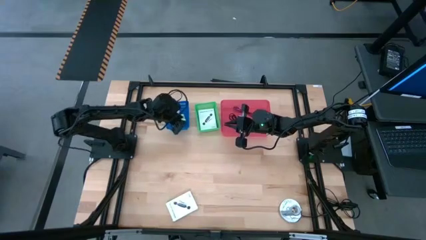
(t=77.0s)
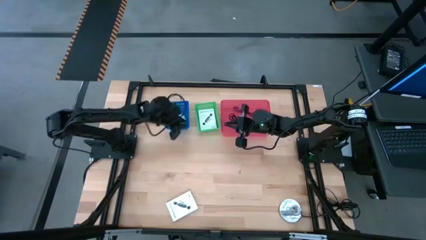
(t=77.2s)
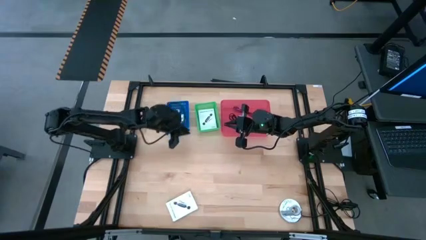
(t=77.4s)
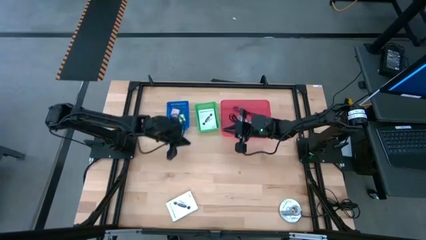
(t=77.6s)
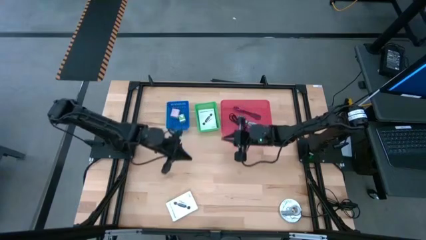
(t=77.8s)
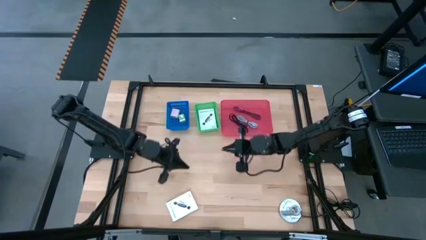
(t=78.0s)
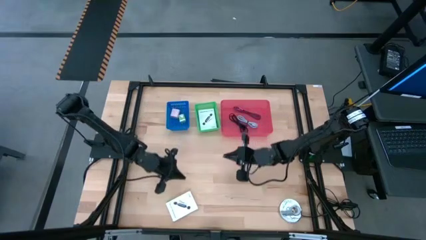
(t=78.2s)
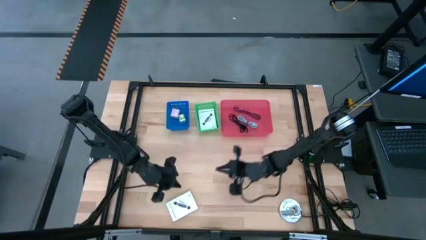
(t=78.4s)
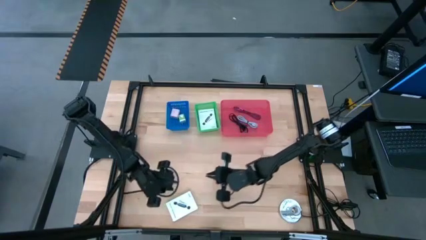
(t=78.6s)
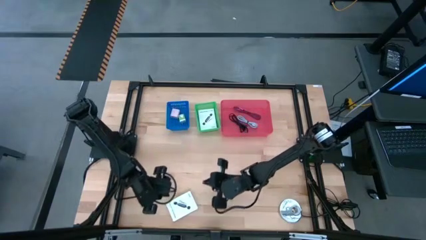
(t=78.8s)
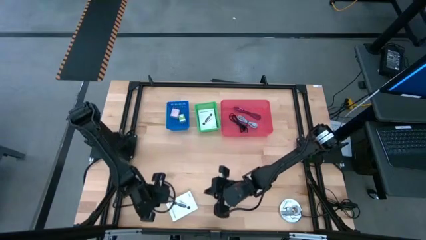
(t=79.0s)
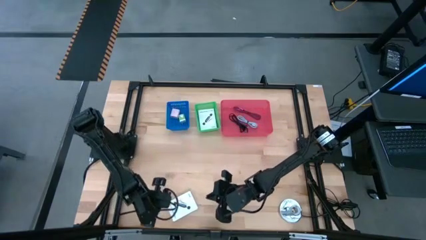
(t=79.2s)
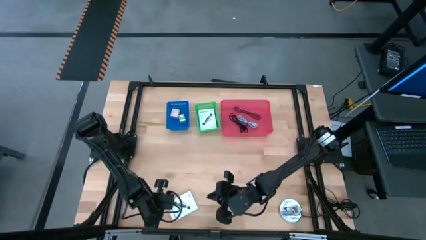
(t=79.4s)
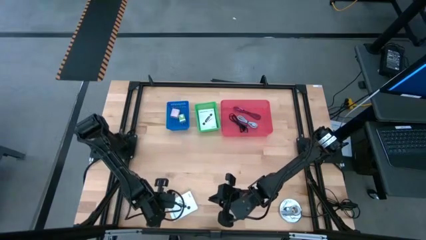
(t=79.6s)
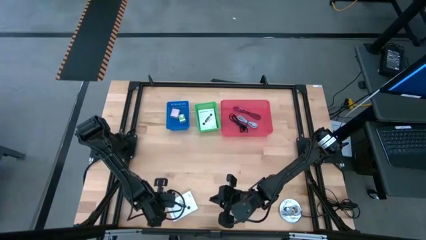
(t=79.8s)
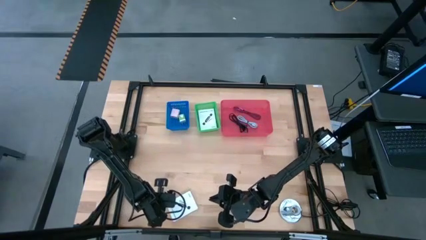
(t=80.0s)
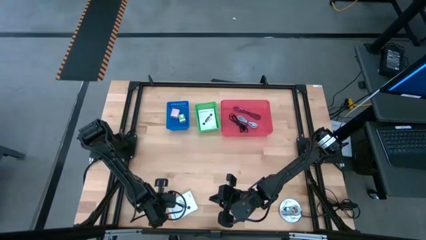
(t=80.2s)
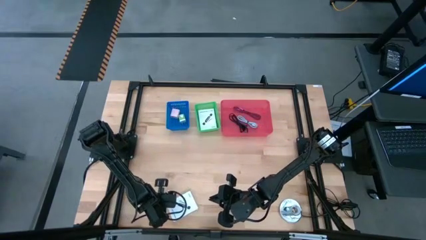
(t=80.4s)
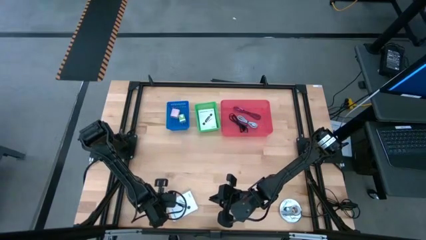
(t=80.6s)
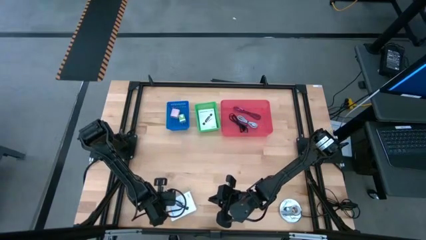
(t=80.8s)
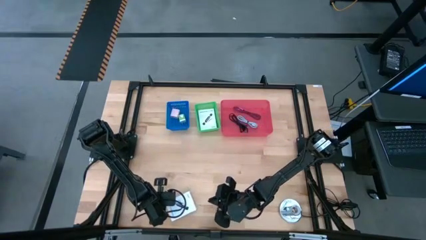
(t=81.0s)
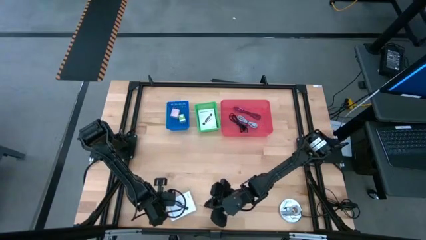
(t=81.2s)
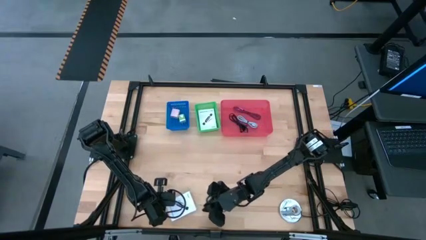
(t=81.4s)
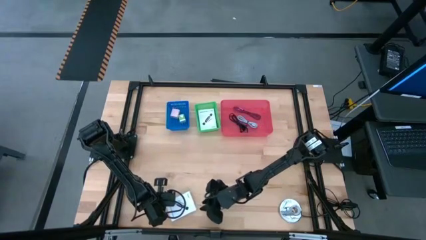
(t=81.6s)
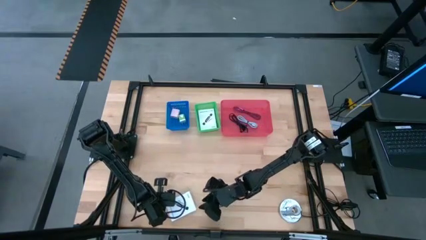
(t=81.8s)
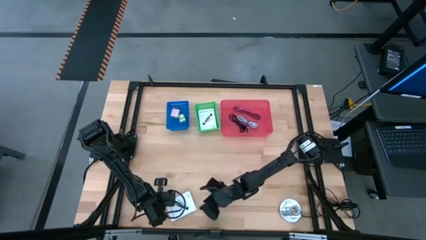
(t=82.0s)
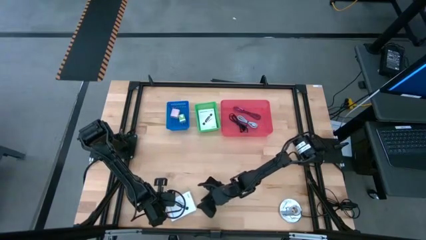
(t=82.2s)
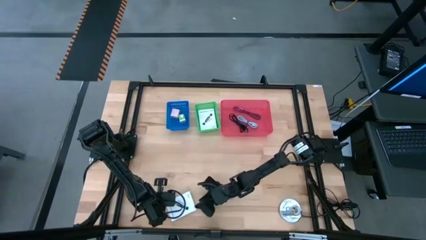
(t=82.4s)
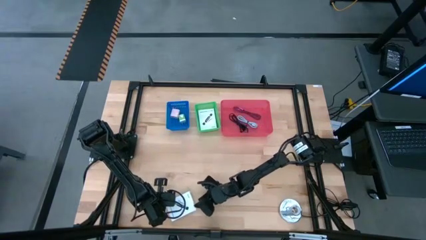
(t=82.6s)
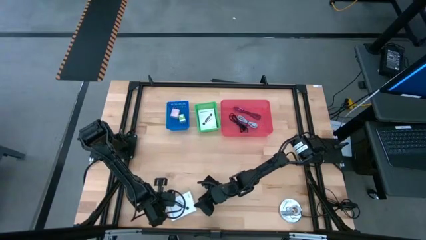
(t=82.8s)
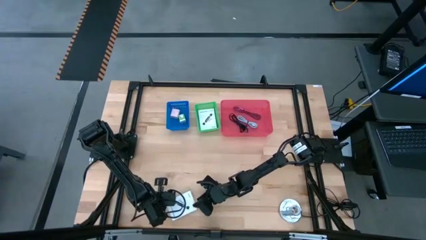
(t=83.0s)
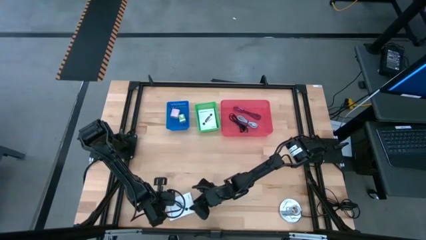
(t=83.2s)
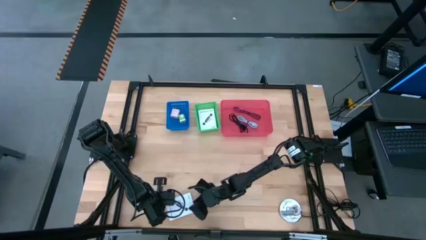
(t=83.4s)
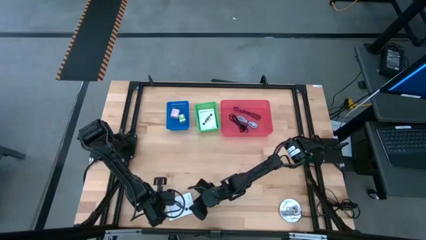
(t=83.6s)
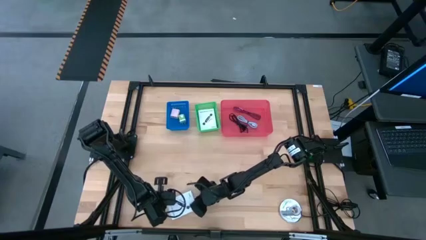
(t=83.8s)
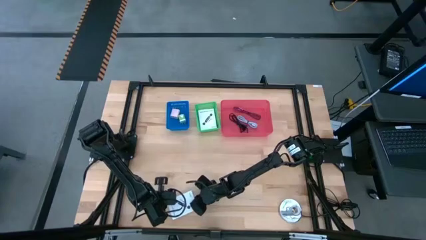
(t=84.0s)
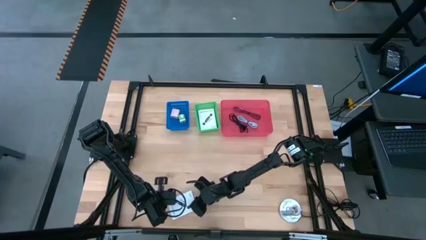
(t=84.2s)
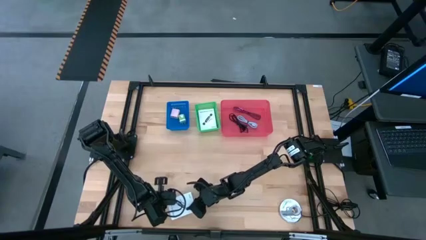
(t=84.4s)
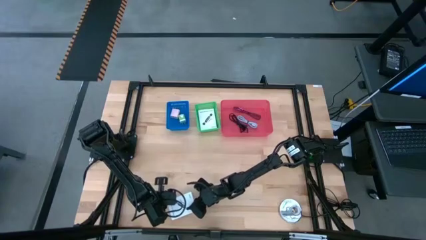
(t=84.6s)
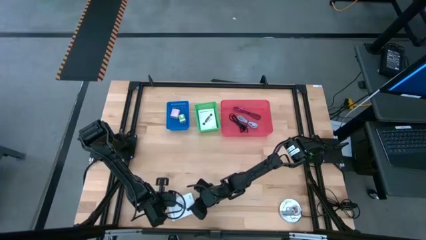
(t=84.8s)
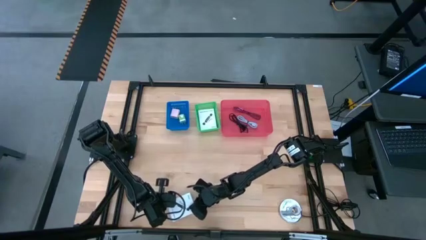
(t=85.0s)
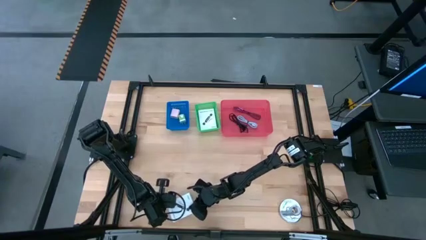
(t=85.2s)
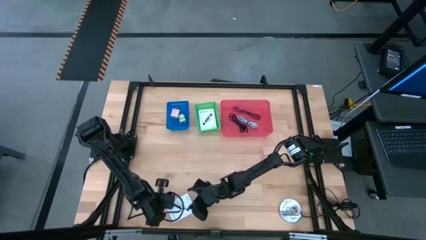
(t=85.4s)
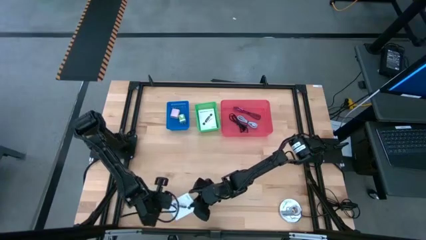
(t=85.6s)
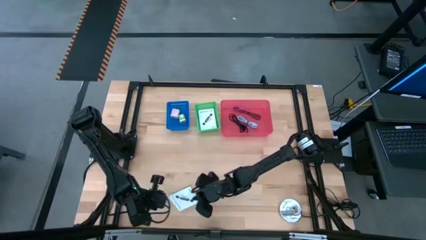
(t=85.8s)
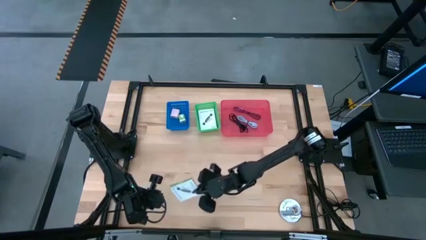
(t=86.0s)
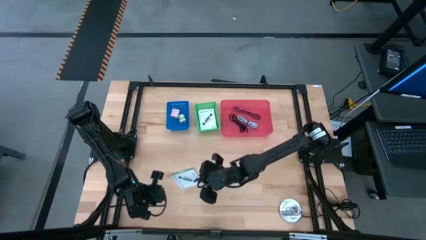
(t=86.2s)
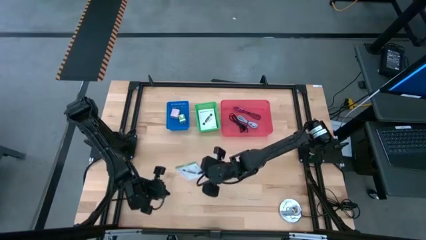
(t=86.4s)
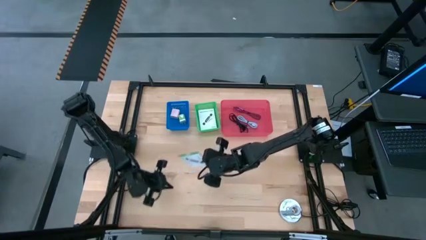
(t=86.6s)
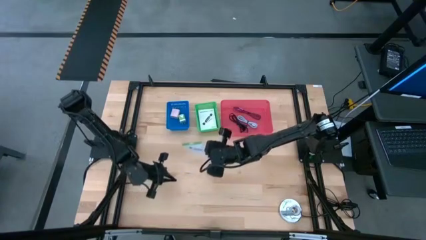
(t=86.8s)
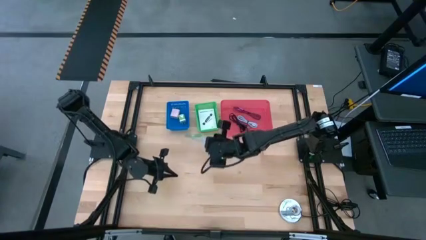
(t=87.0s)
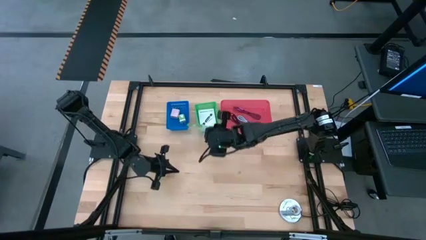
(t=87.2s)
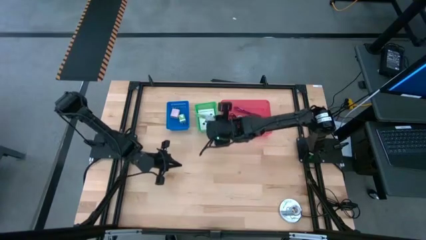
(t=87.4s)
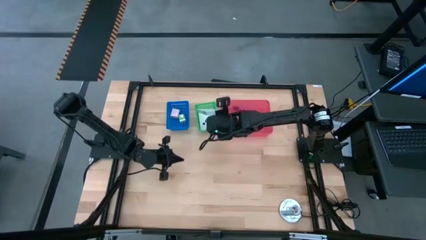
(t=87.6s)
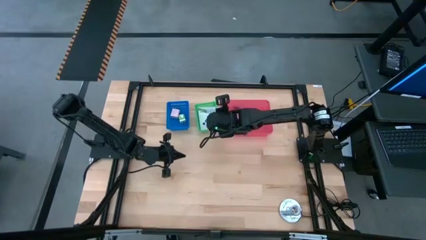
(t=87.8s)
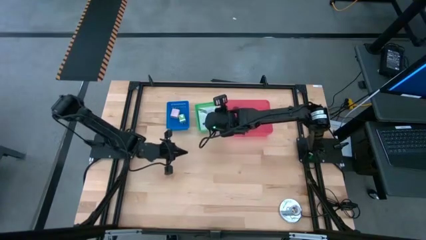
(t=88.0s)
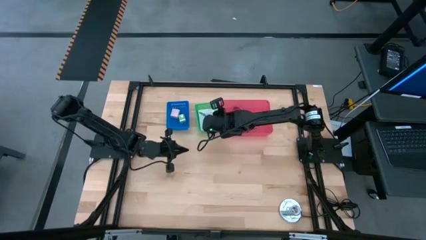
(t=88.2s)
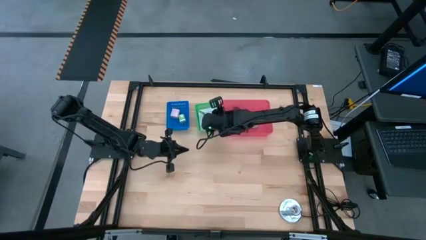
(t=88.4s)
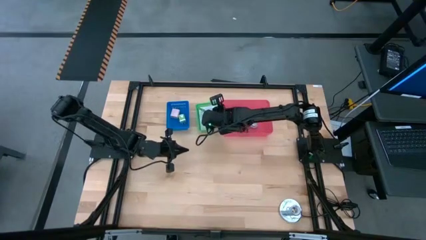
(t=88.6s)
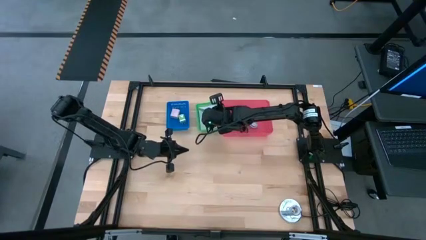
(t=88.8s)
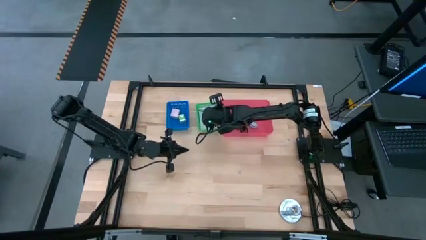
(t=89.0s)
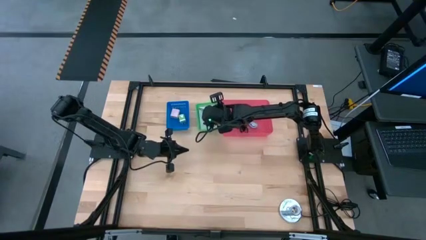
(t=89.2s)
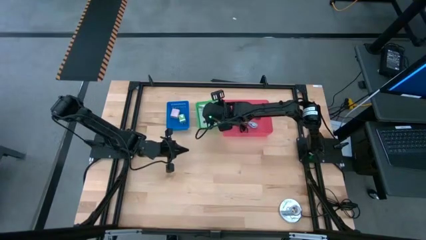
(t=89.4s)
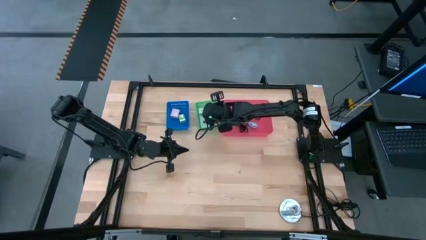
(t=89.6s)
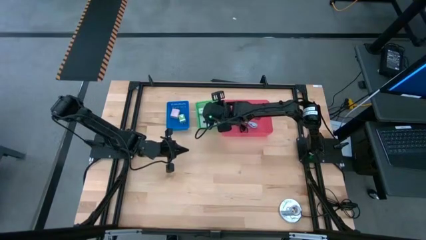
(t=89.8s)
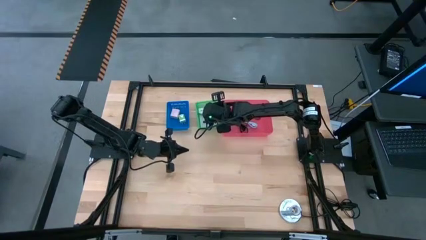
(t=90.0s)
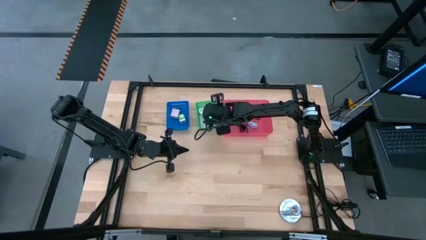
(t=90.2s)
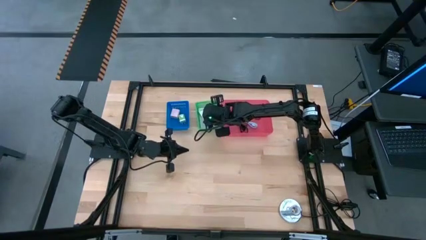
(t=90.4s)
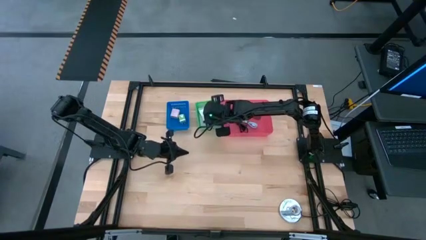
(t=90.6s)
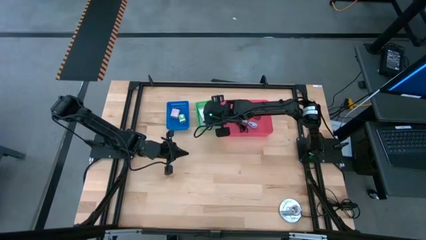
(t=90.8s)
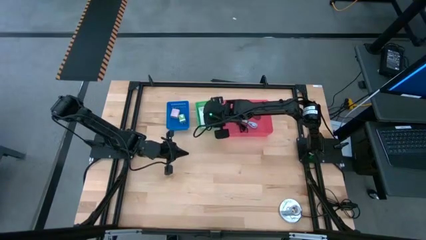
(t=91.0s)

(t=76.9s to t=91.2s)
Task: Pick and place items into bin
Put the card reader box into the green bin

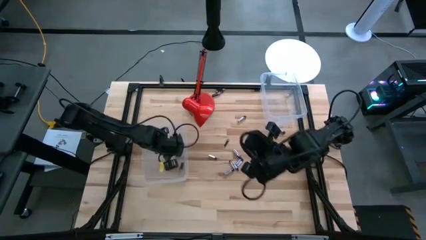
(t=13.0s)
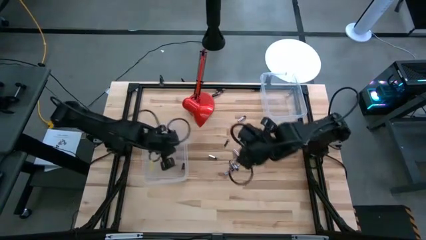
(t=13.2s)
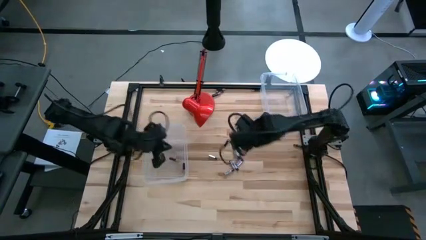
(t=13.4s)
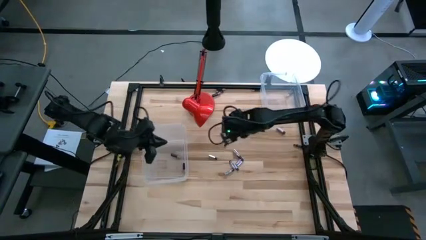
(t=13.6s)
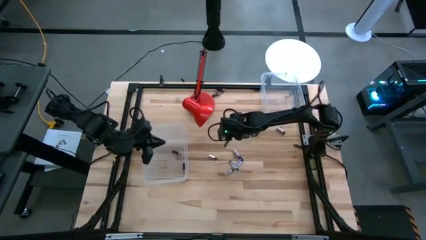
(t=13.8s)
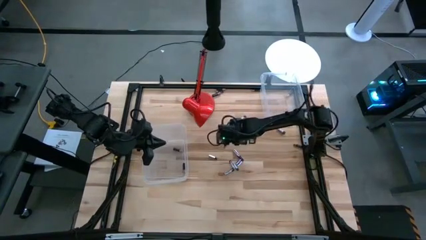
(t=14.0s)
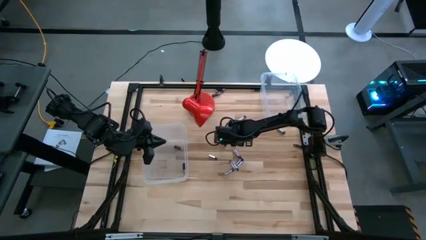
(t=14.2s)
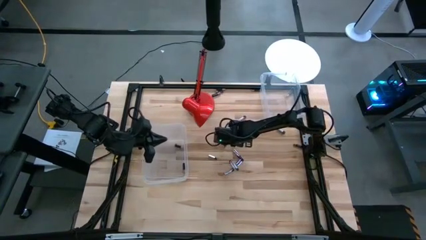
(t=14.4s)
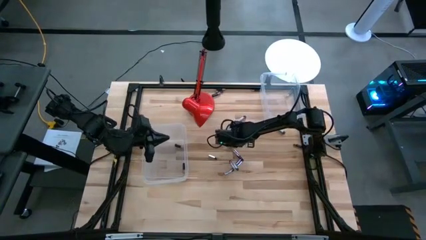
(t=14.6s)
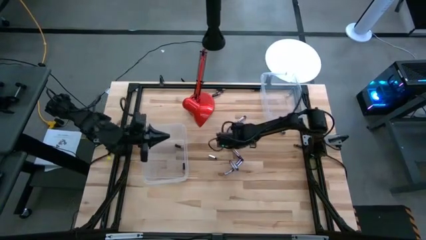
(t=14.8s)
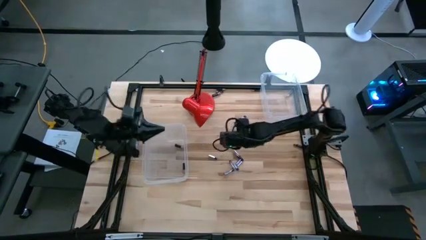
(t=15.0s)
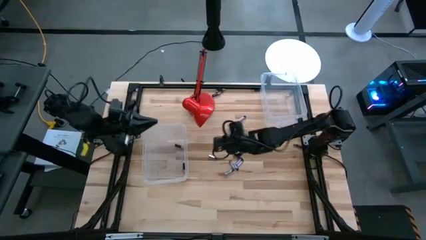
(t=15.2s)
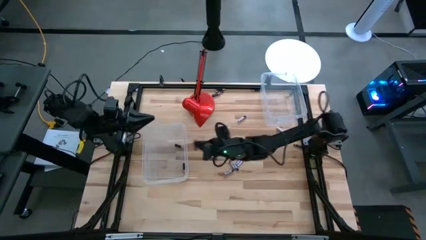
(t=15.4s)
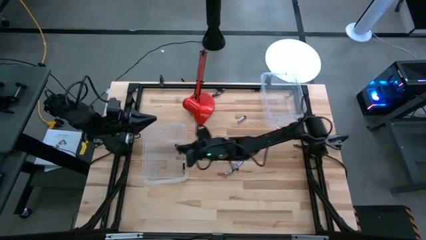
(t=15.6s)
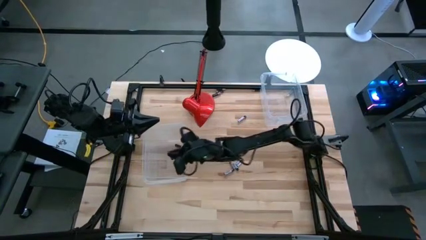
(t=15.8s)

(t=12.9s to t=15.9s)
Task: Sort batteries
Put the black battery into the bottom transparent bin
